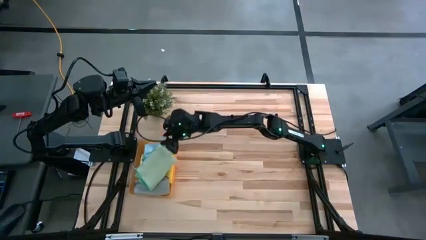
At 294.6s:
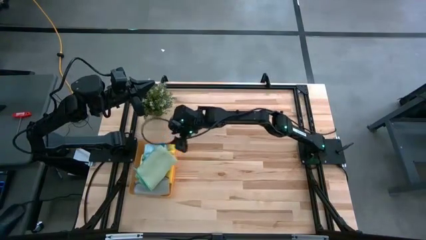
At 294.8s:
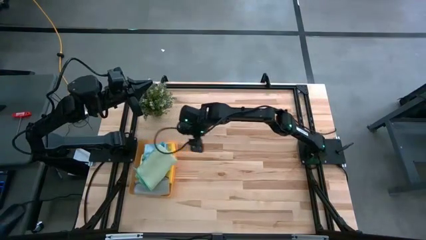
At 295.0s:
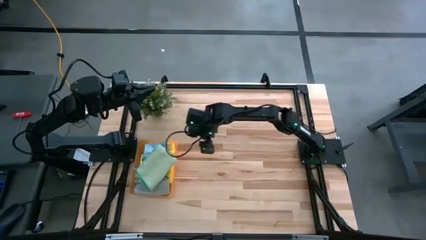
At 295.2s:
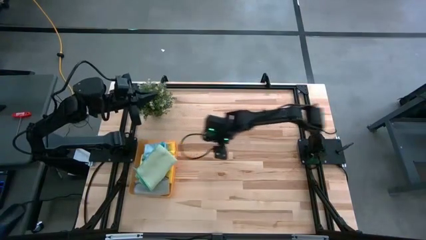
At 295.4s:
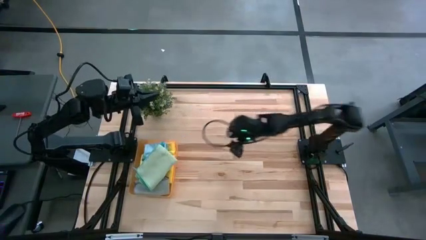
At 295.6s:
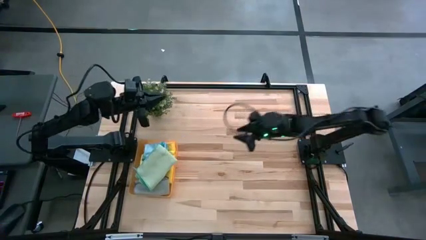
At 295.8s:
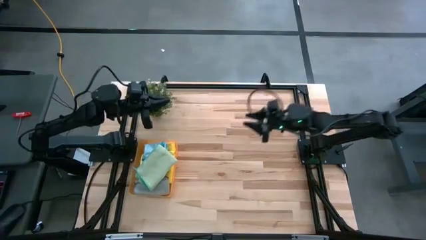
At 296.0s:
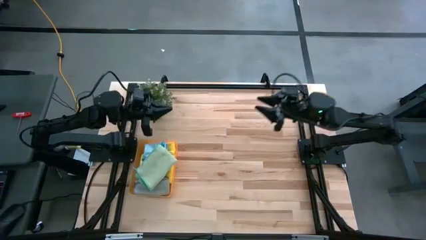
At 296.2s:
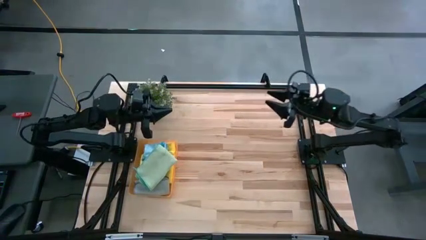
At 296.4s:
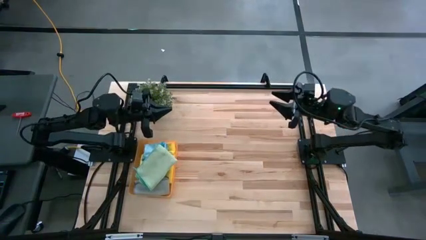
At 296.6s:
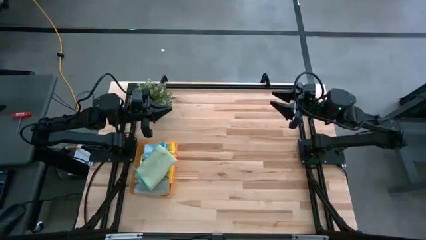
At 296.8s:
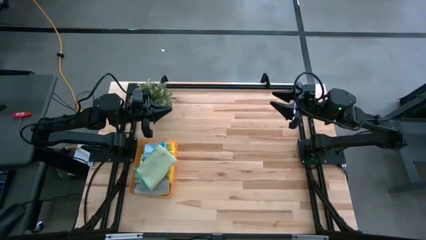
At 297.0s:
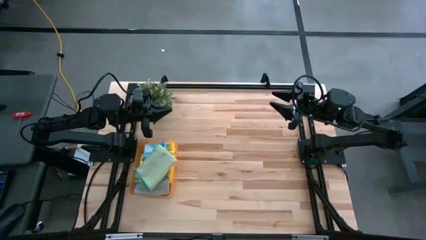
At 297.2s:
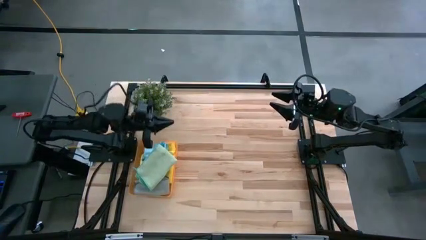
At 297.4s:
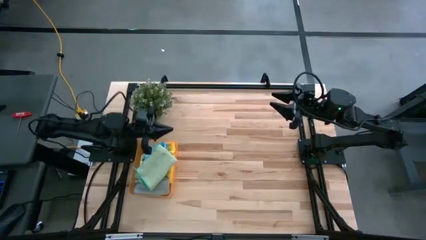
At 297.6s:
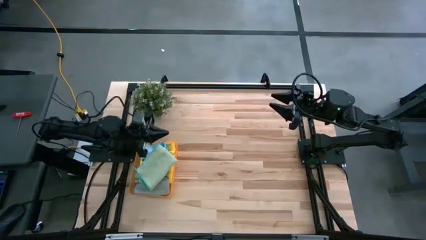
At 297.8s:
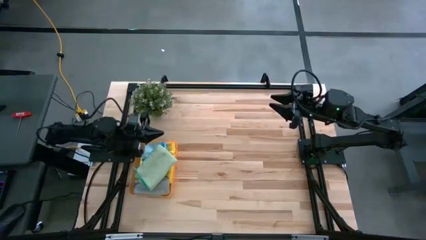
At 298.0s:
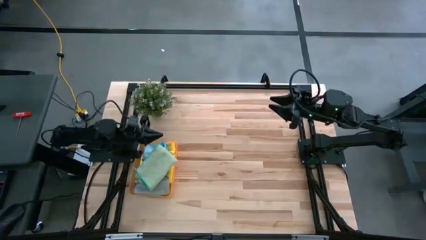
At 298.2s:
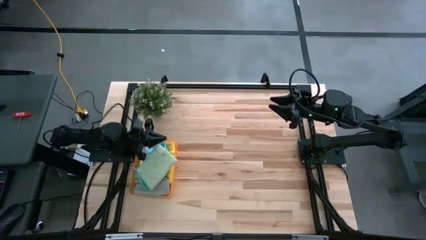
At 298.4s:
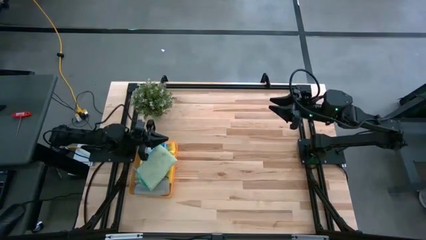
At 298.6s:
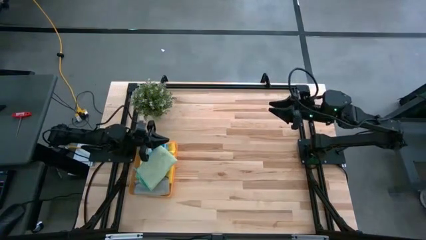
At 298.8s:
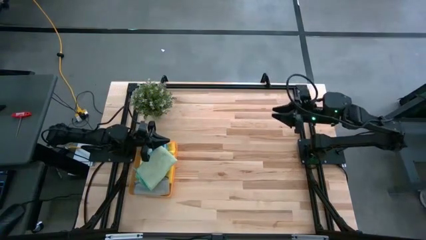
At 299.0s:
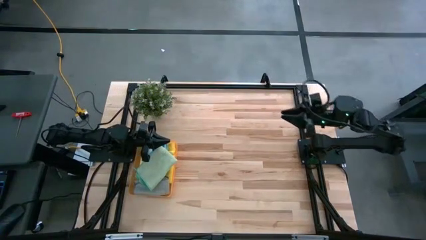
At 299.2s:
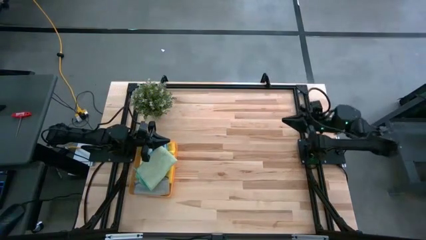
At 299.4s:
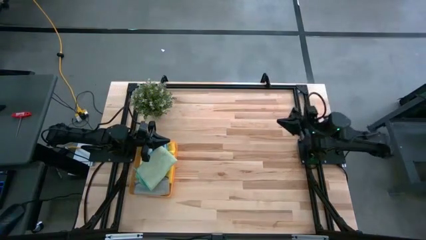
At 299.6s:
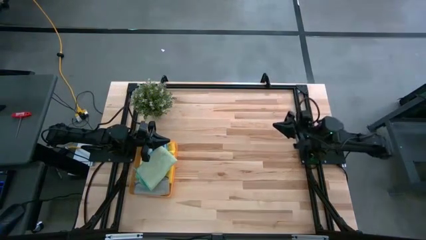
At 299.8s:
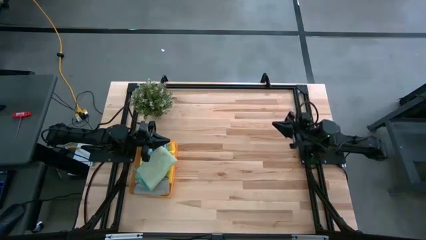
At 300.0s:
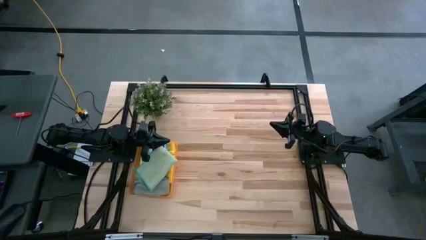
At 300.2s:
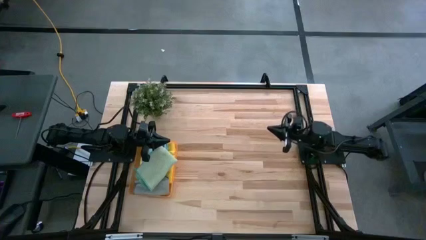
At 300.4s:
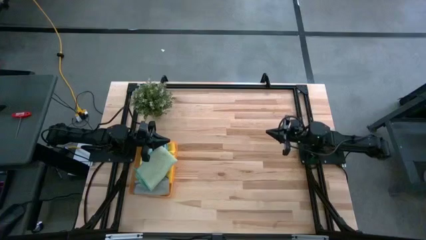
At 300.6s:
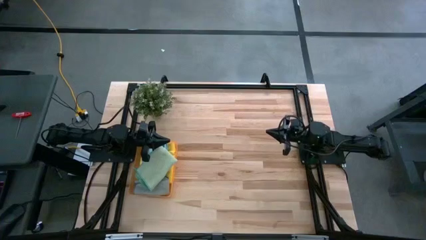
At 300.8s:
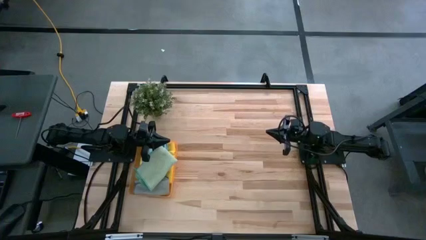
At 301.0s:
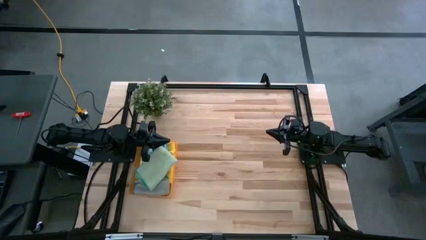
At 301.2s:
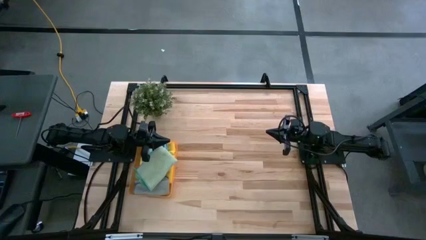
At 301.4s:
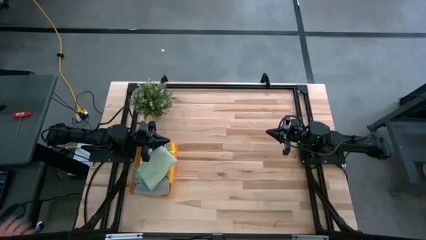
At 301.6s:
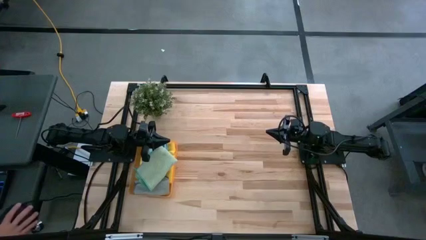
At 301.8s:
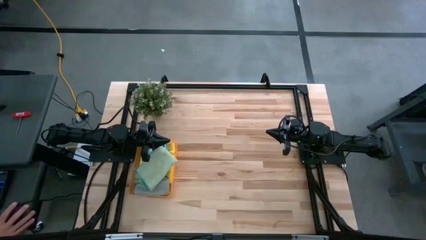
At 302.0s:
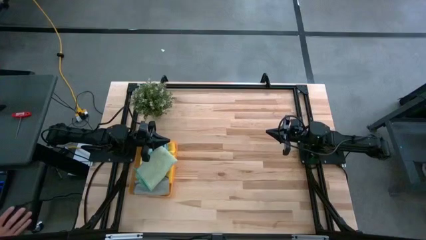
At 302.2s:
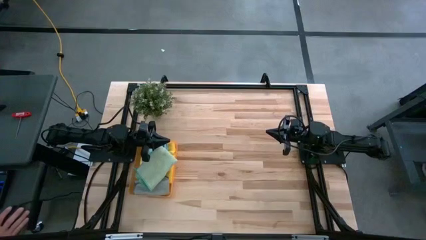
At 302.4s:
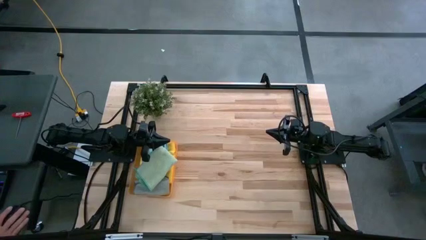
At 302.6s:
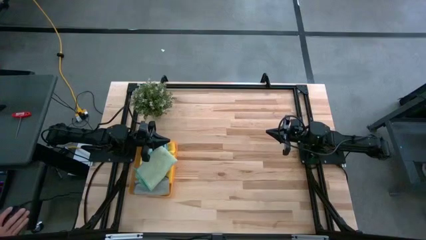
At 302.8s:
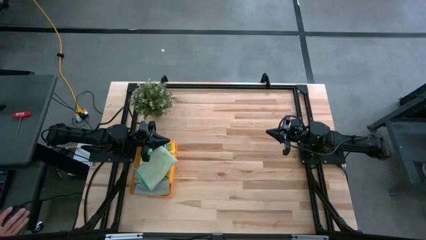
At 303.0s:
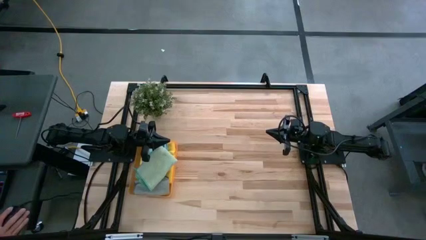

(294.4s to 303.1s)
Task: Fold microfiber towels
Return to Home Position

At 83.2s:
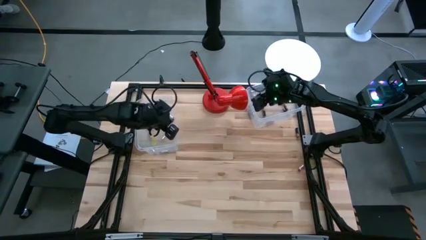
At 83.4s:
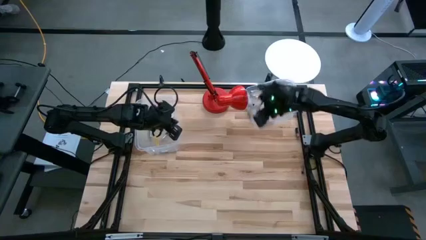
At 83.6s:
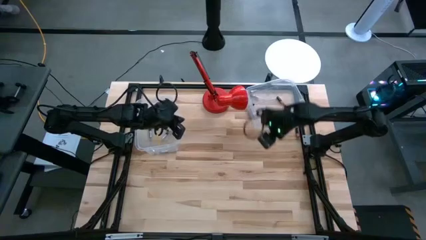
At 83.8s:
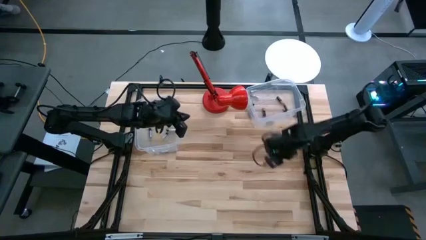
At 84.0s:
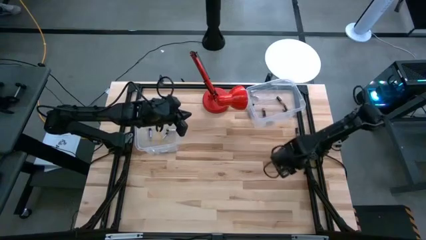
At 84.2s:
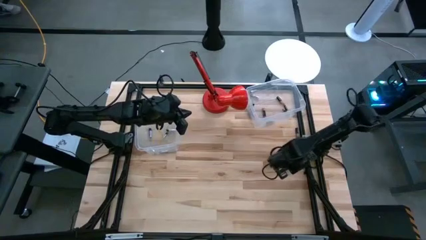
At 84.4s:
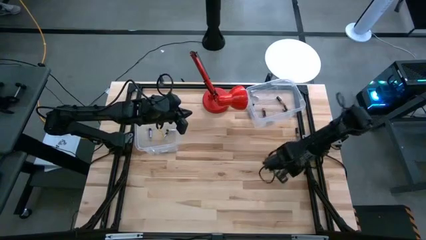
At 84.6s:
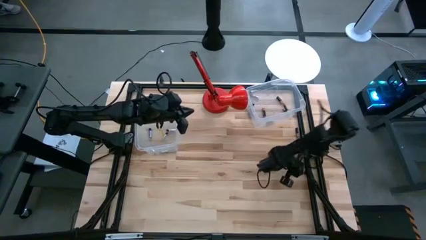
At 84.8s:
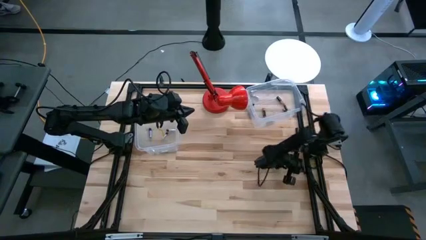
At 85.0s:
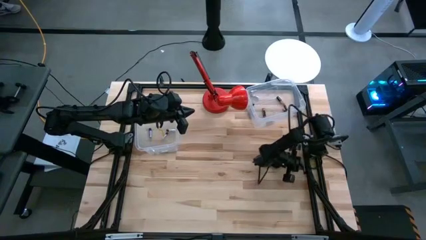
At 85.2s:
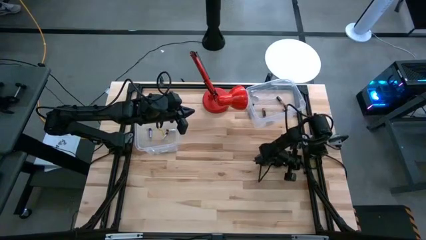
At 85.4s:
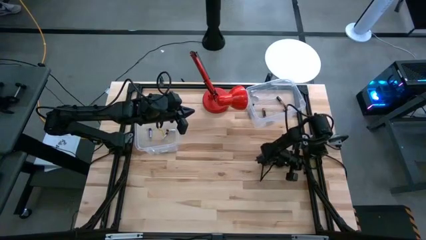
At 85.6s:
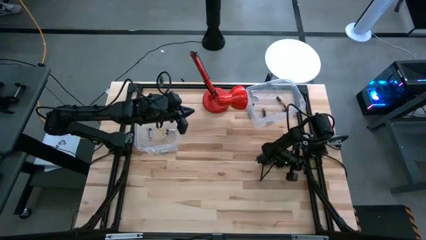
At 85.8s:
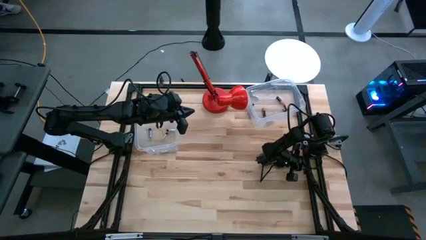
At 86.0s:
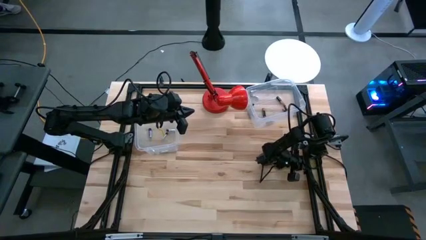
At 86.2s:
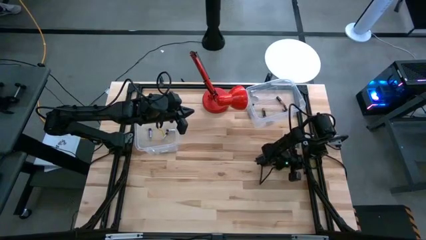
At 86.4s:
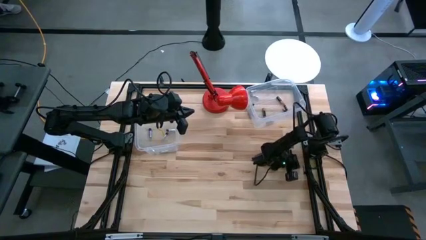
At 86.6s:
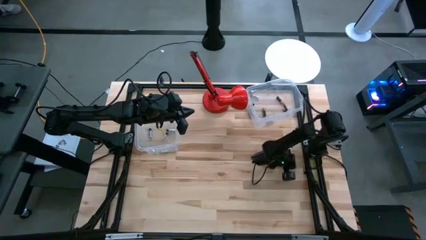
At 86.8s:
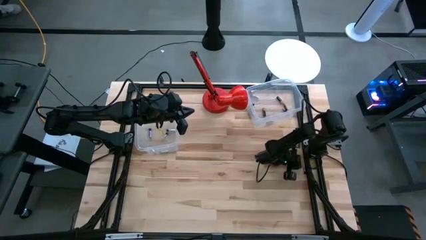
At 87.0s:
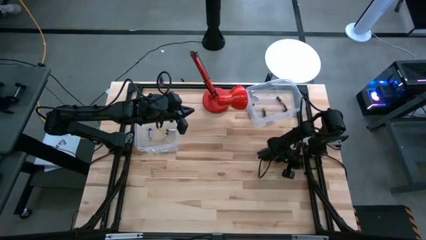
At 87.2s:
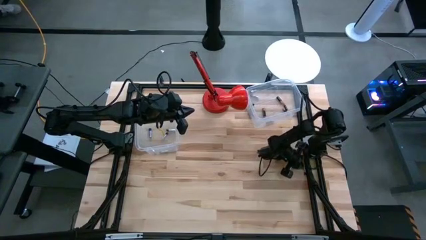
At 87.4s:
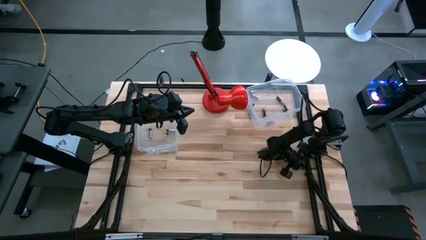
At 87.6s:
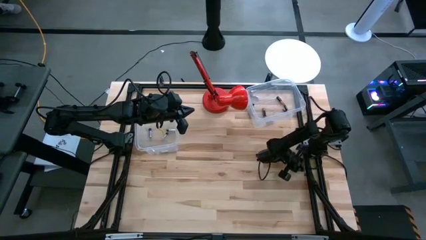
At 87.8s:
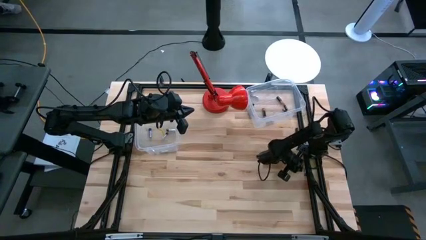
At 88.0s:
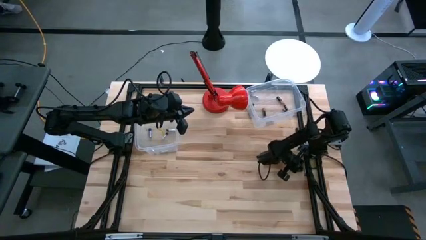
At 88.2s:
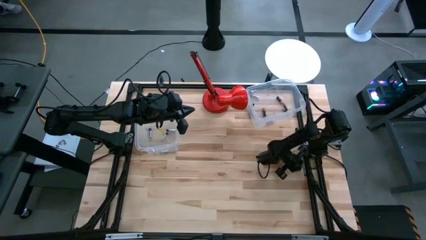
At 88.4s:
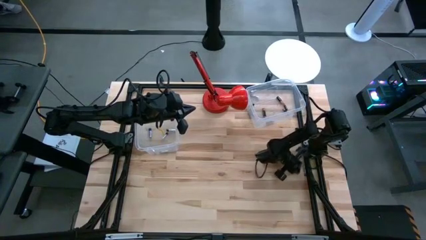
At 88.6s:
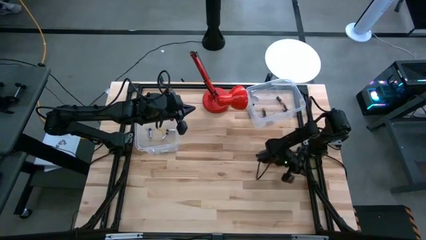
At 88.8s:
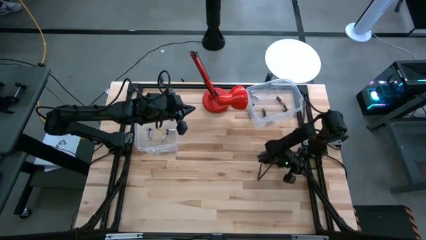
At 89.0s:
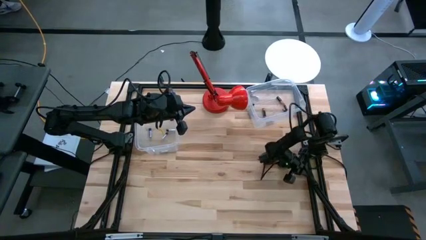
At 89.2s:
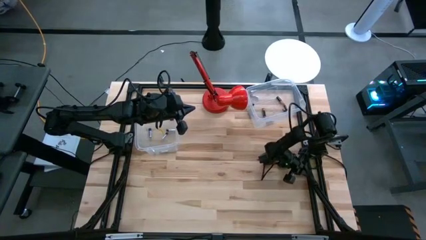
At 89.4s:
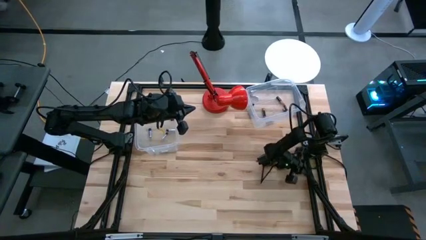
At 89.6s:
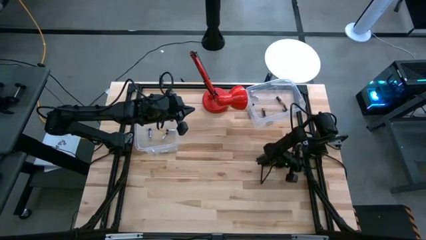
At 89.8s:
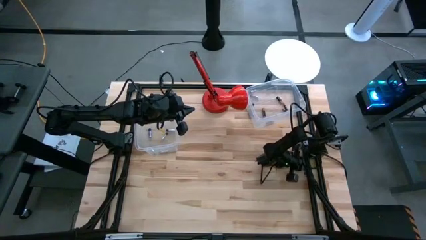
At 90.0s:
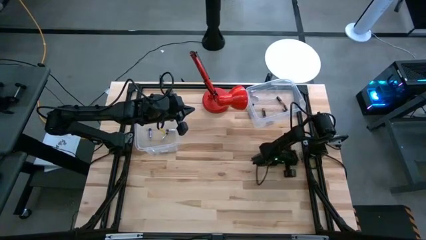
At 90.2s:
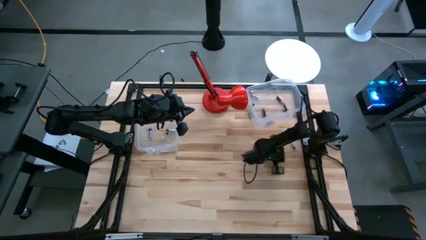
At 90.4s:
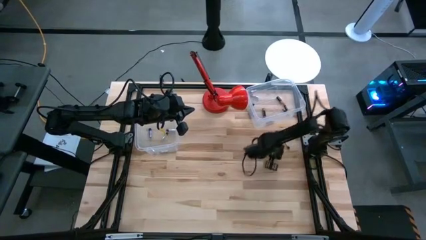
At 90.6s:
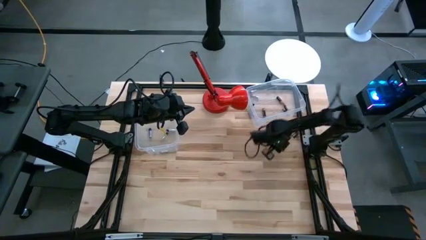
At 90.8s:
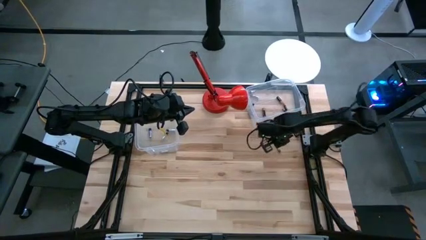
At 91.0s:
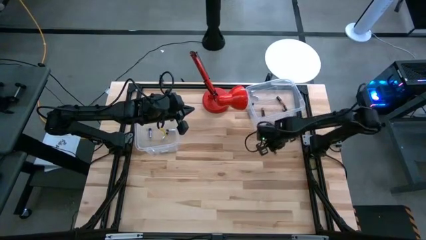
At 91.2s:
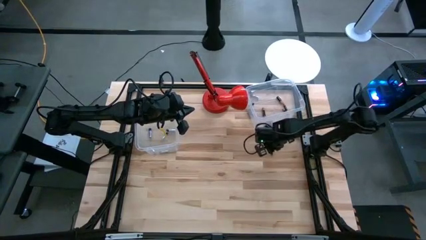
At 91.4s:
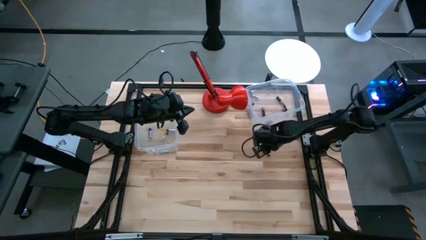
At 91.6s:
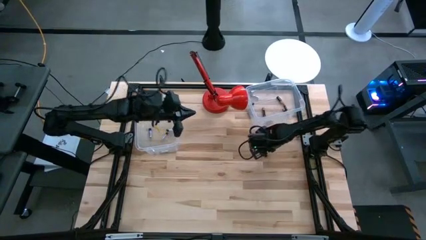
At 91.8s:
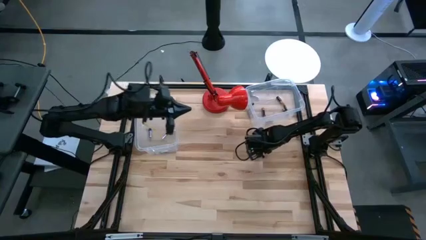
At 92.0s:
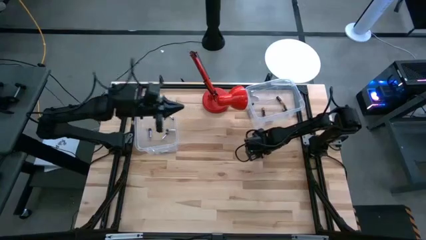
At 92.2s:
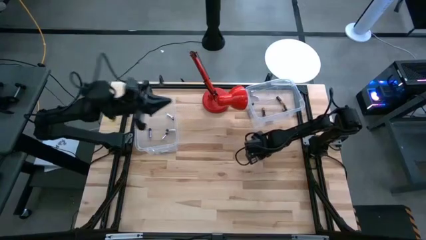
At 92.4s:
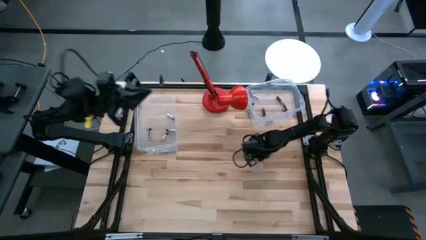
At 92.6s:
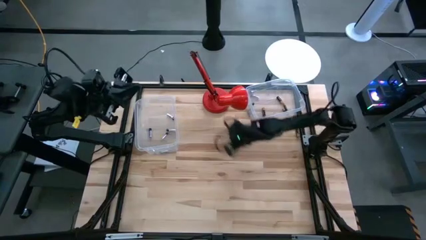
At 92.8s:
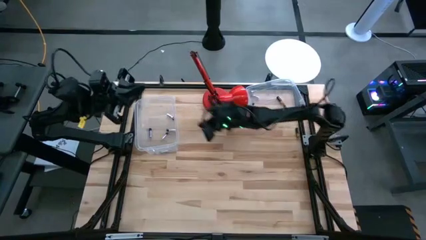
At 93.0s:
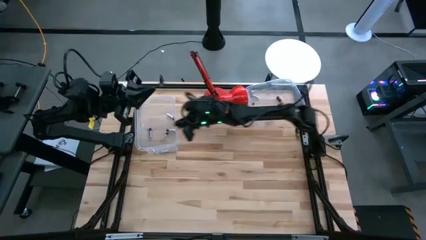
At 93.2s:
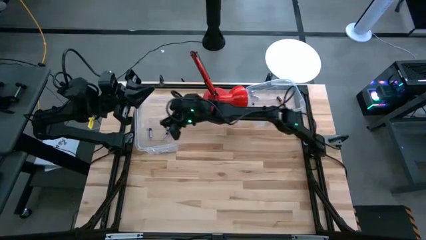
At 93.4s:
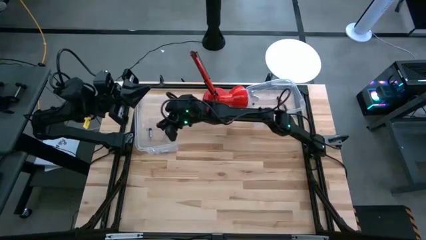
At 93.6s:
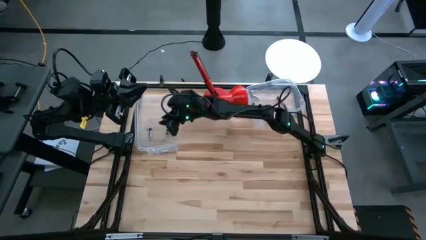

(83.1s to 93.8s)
Task: Sort batteries
Put the silver battery into the left transparent bin
